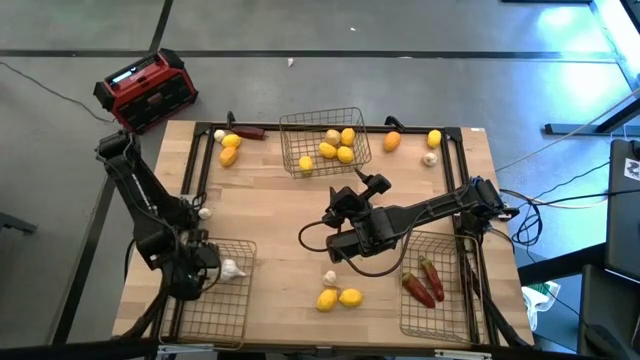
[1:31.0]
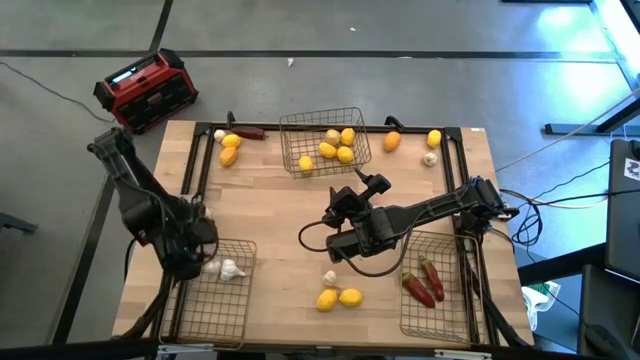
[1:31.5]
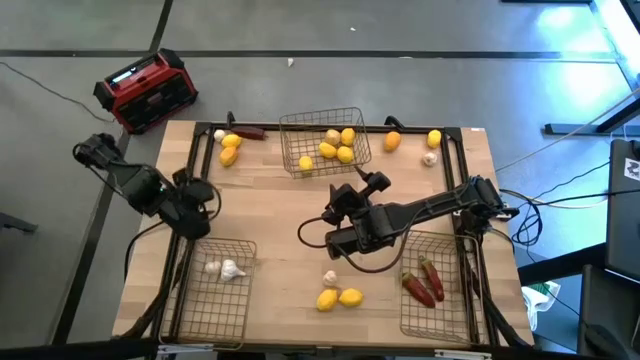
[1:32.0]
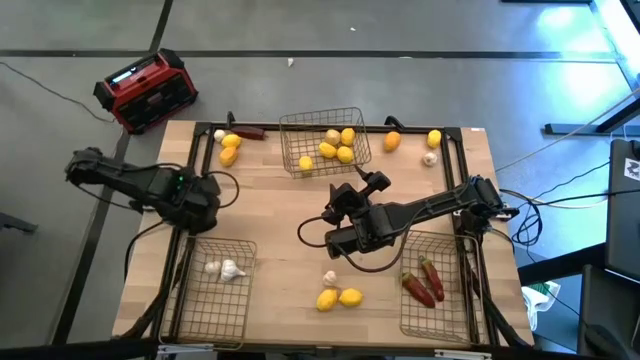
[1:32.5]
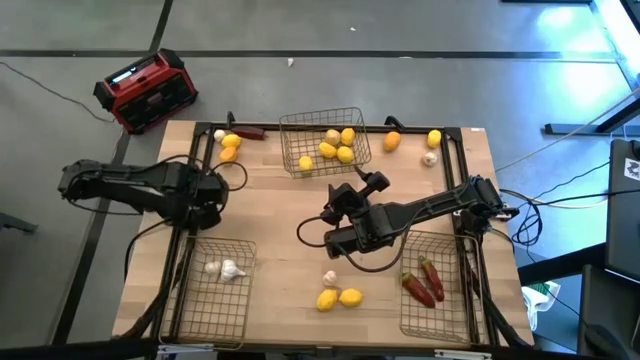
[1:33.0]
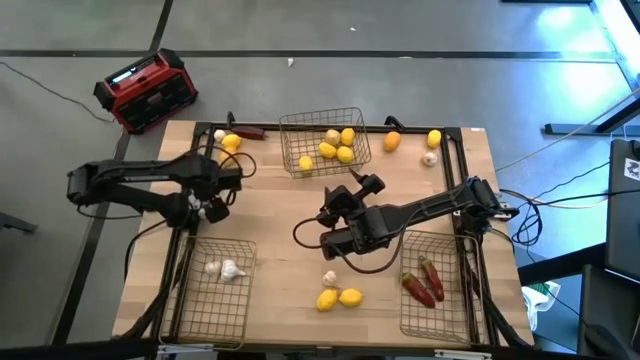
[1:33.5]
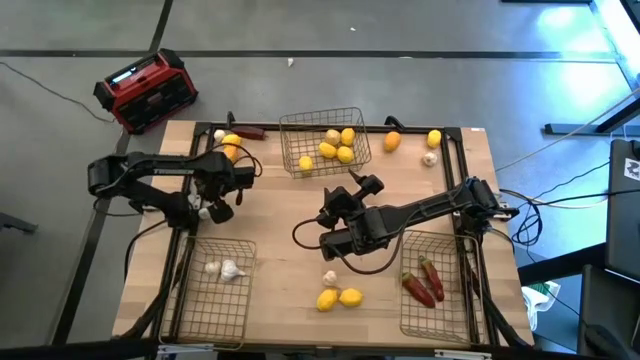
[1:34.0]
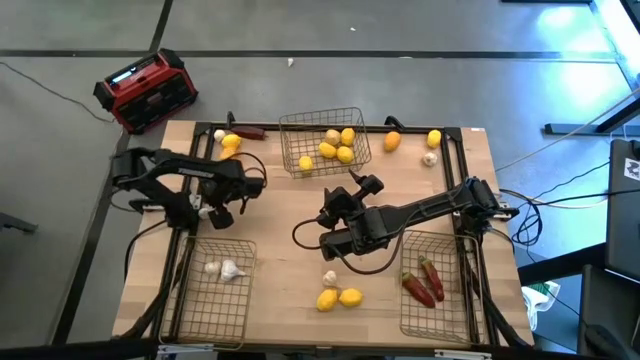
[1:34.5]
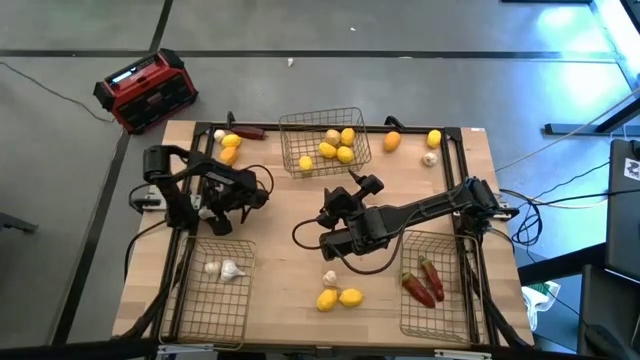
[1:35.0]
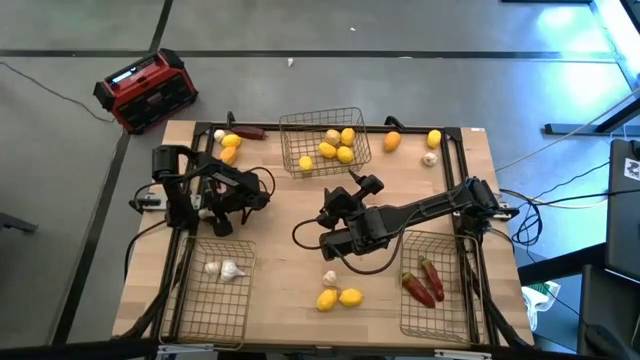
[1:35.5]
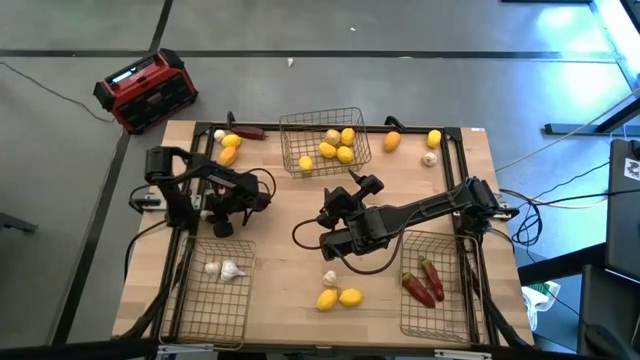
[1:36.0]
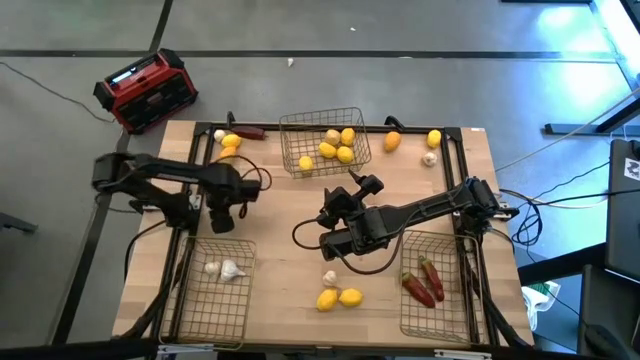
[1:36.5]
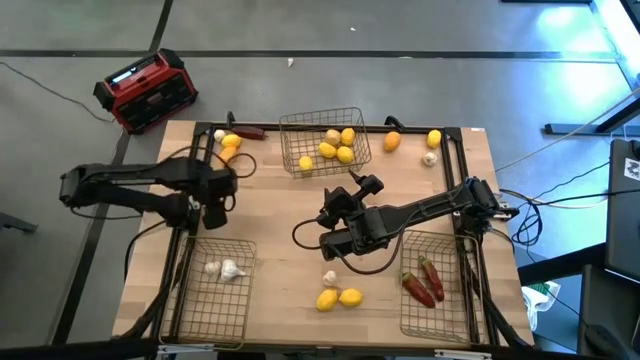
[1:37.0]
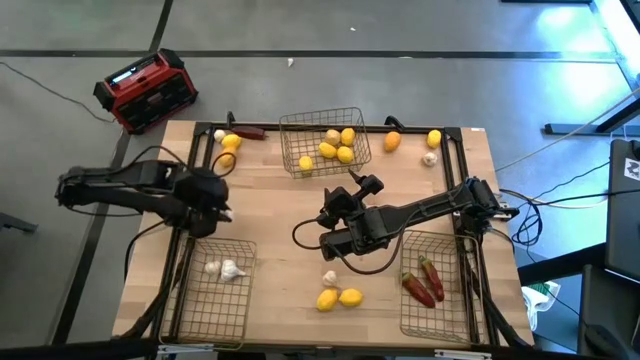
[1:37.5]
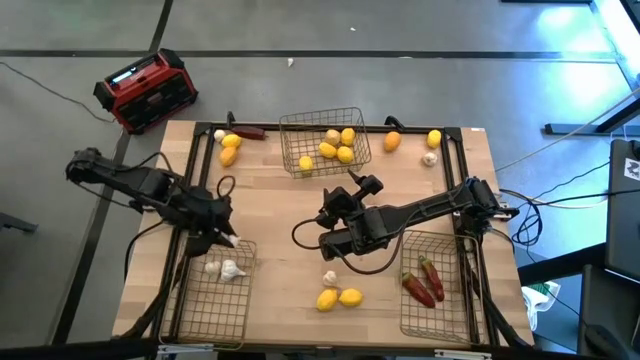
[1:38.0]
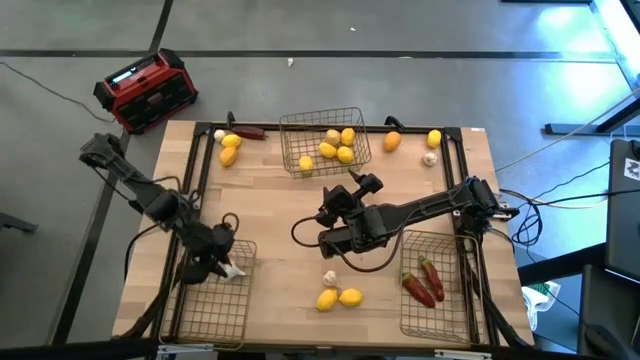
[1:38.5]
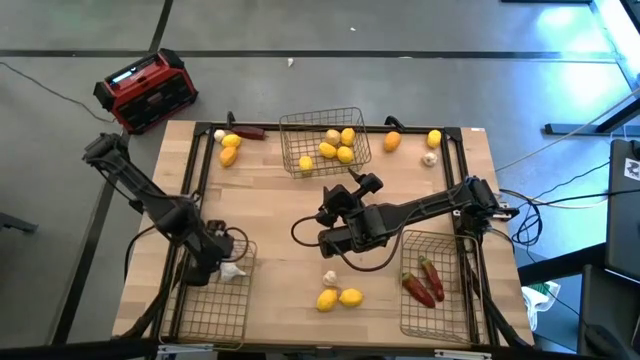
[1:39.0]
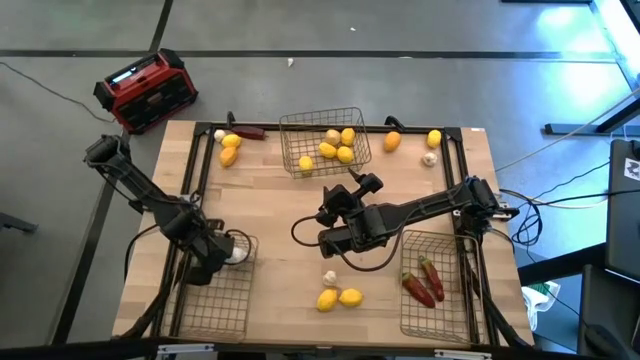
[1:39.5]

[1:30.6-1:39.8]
Task: Sort produce into baskets
Put the garlic into the bottom left wire basket

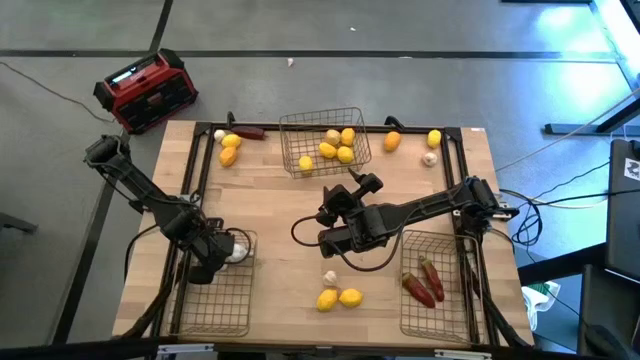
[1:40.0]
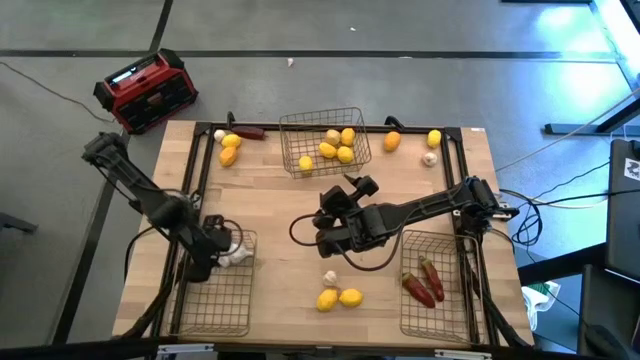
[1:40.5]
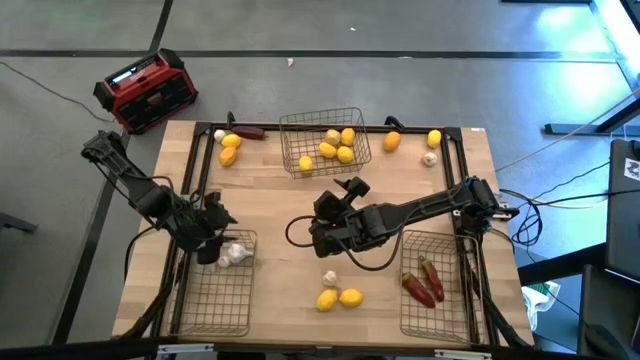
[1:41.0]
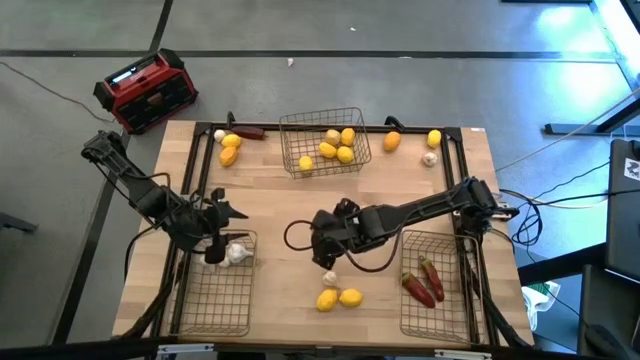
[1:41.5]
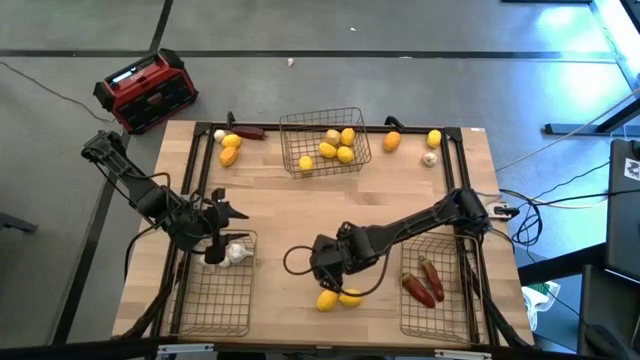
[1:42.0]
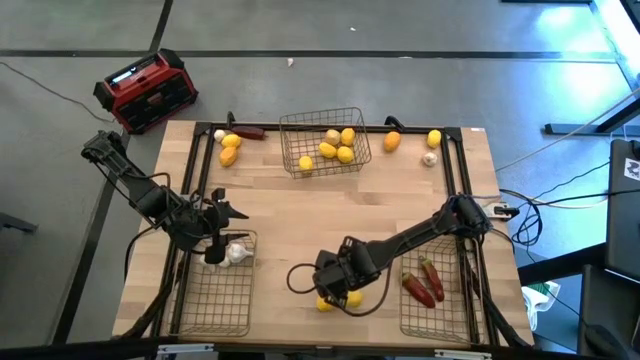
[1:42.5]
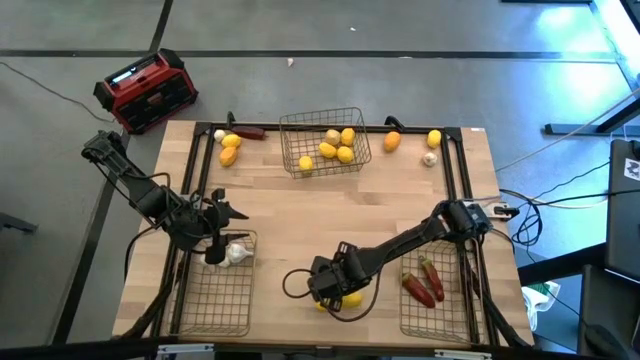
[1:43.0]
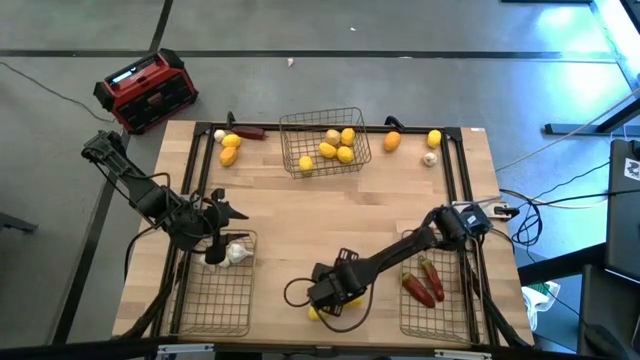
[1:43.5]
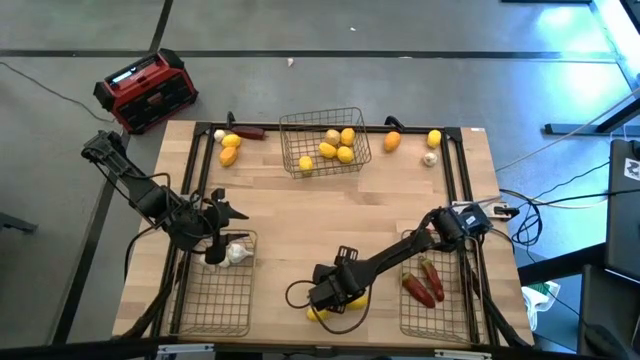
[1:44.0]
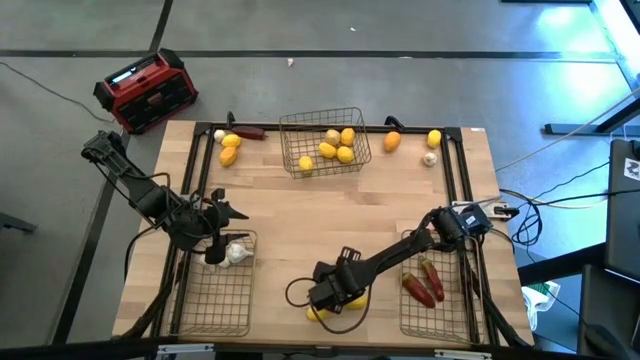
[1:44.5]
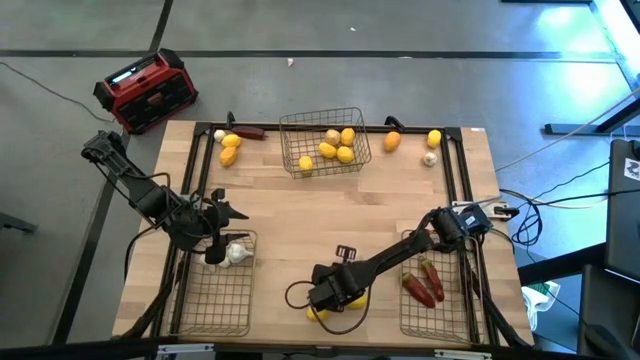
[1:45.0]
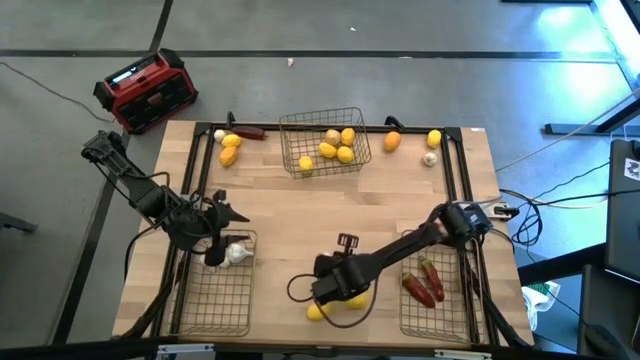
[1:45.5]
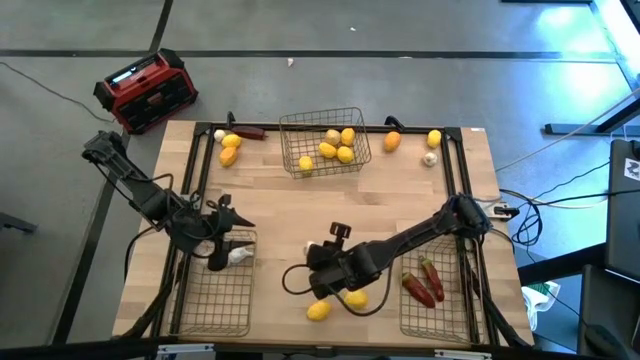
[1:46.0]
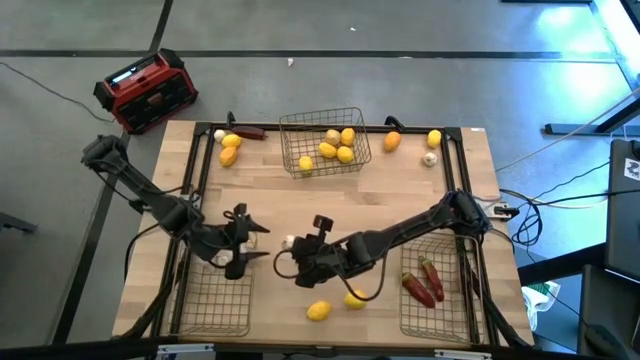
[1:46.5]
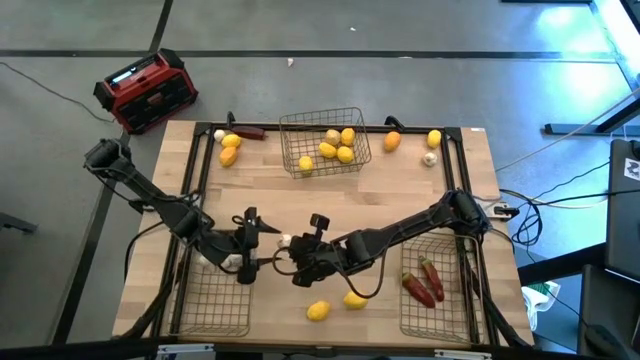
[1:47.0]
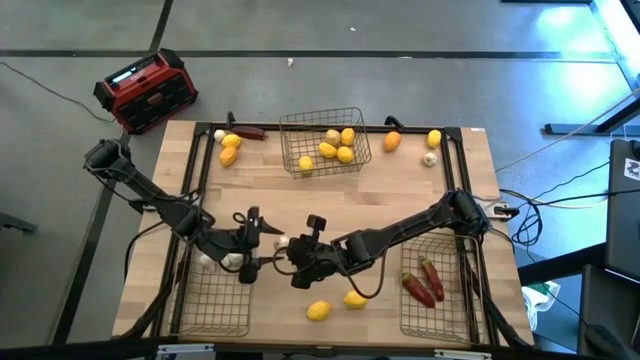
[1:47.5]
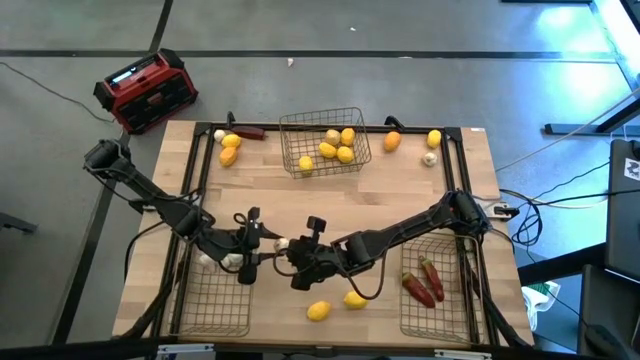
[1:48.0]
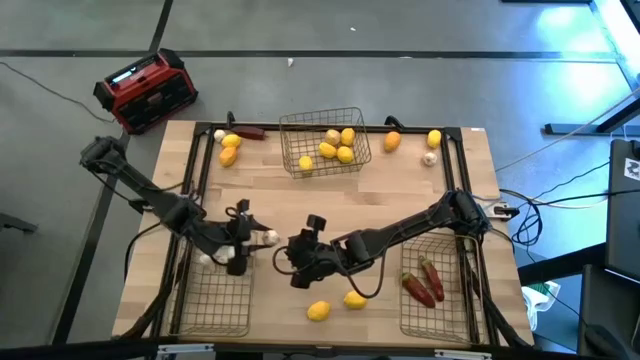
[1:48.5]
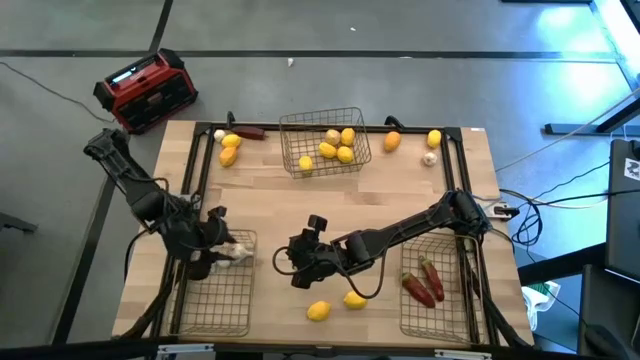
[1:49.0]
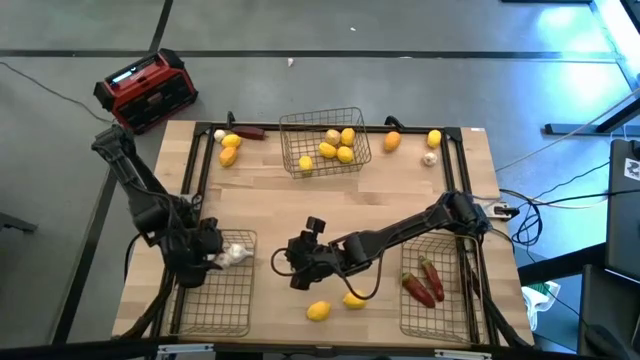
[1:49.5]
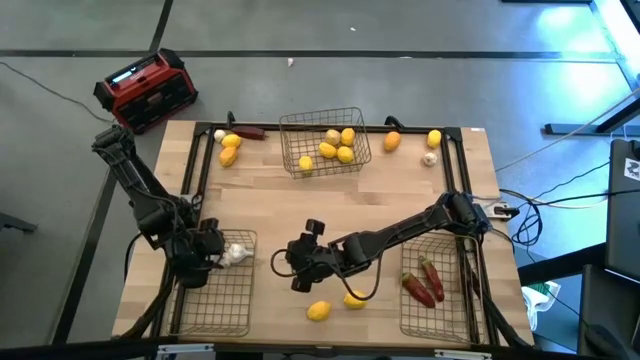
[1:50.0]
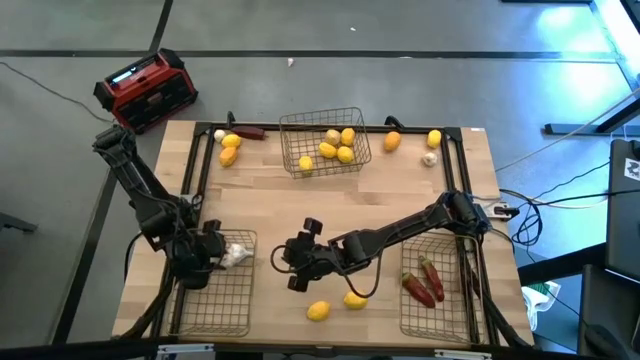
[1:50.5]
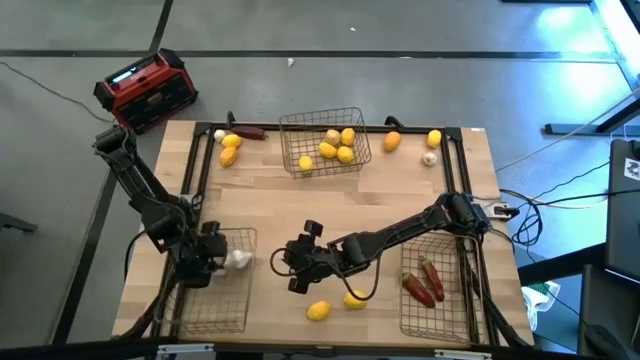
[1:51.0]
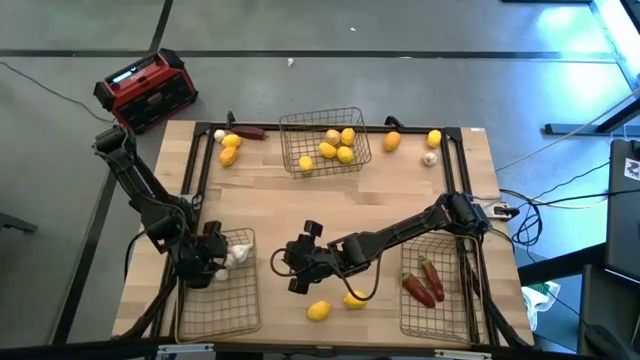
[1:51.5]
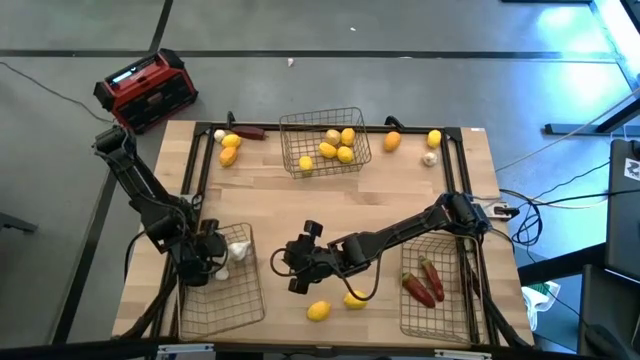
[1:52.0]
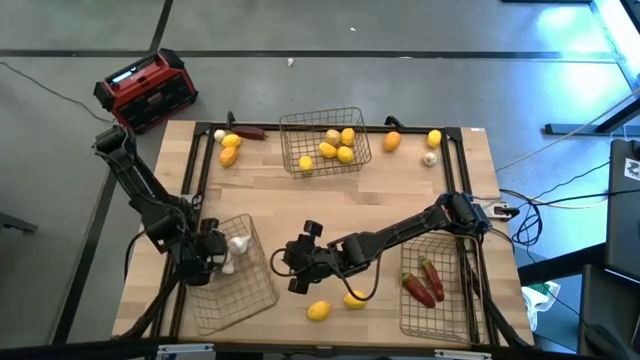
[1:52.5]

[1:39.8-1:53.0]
Put the garlic into the bottom left wire basket
